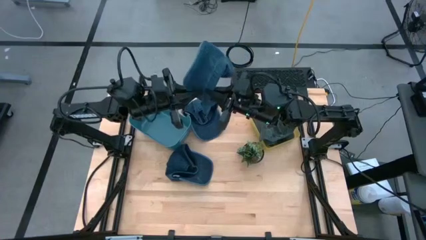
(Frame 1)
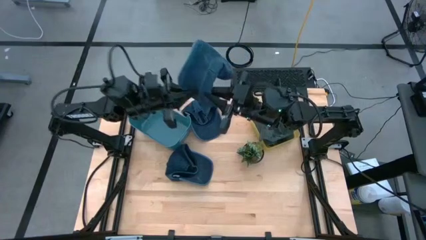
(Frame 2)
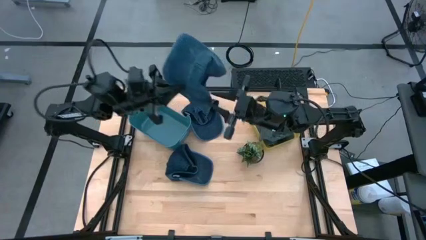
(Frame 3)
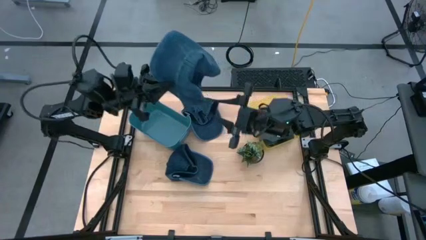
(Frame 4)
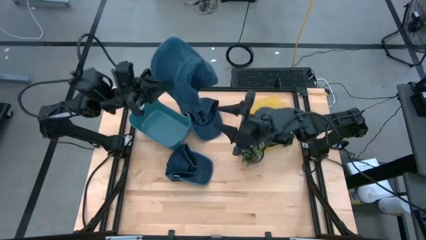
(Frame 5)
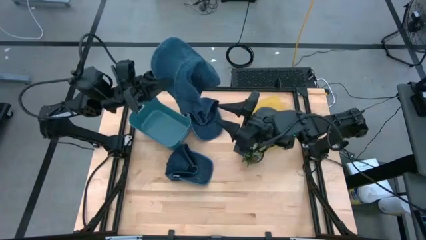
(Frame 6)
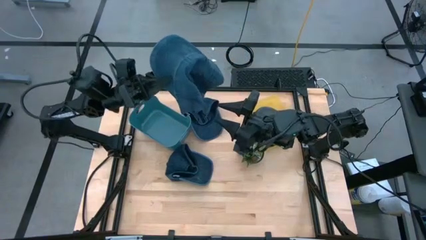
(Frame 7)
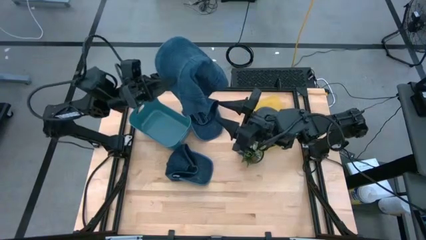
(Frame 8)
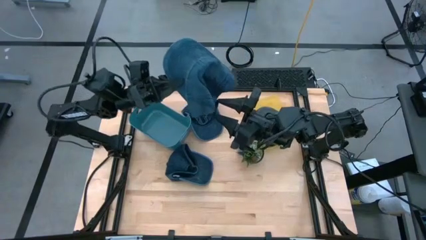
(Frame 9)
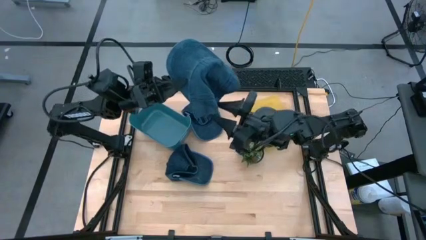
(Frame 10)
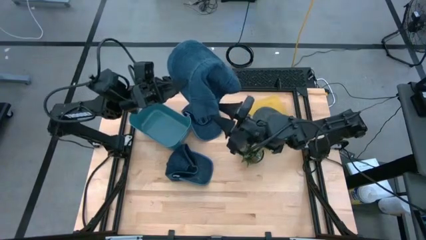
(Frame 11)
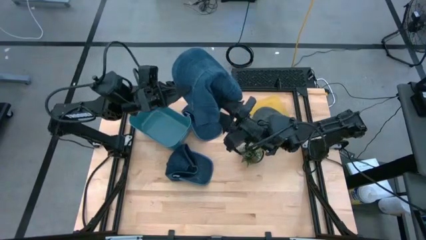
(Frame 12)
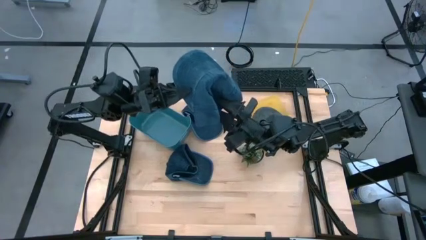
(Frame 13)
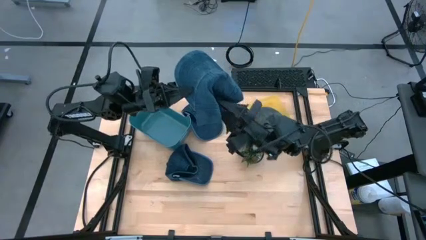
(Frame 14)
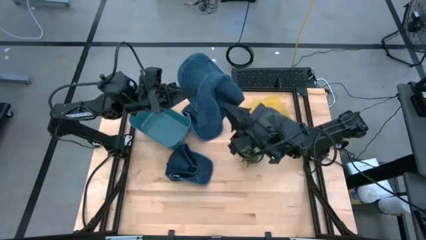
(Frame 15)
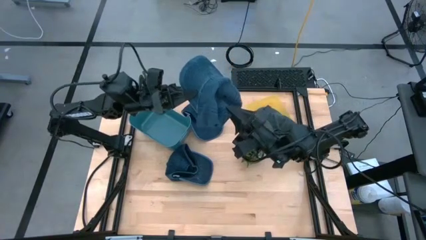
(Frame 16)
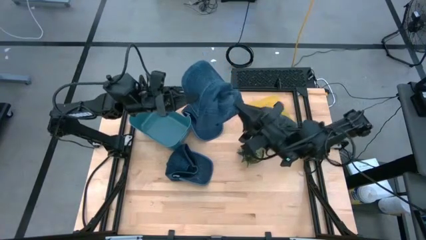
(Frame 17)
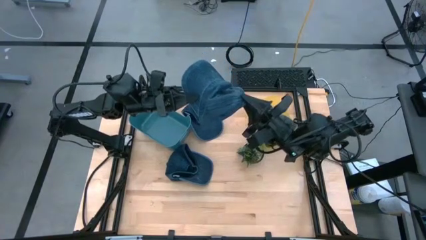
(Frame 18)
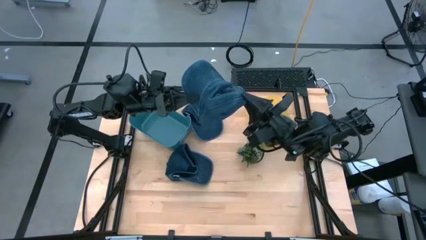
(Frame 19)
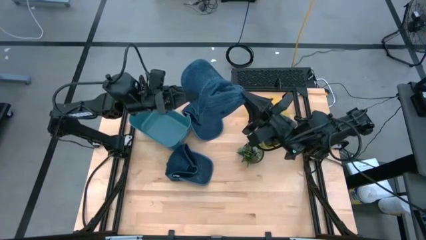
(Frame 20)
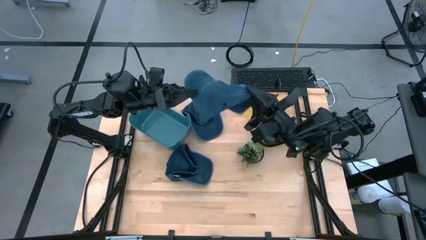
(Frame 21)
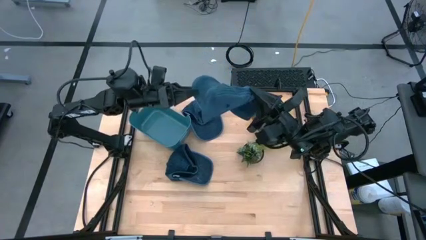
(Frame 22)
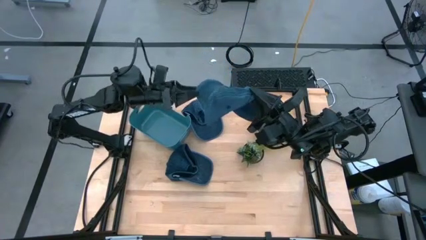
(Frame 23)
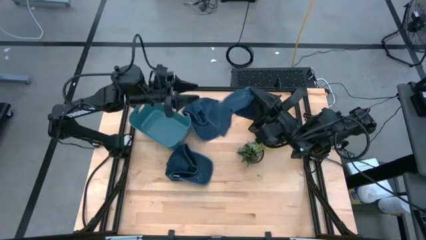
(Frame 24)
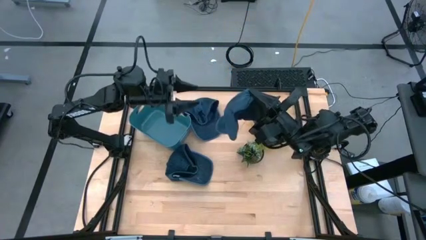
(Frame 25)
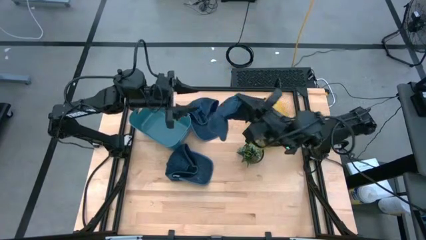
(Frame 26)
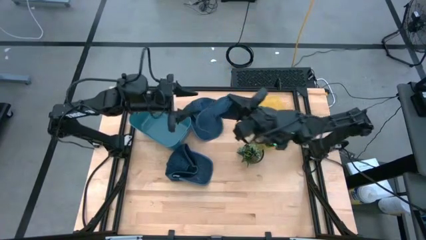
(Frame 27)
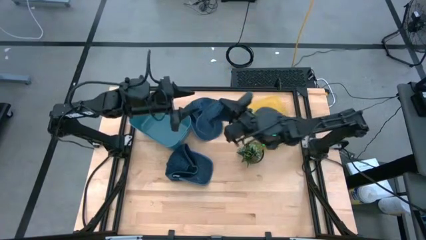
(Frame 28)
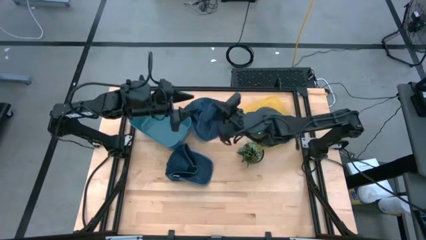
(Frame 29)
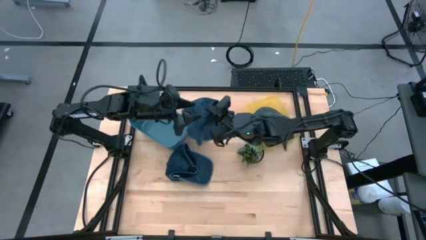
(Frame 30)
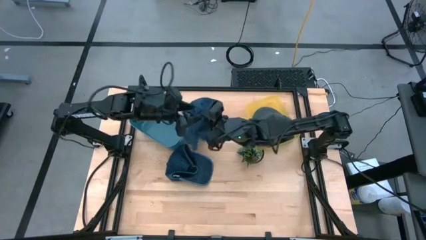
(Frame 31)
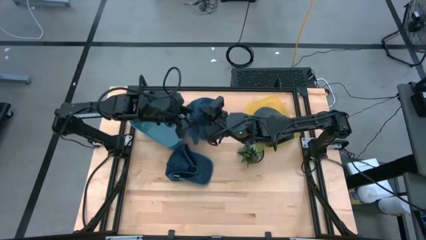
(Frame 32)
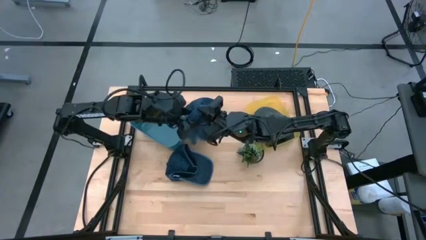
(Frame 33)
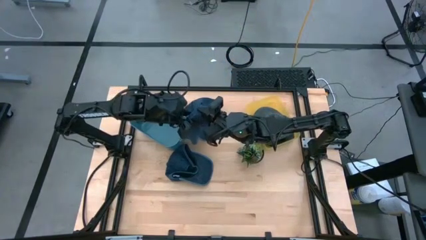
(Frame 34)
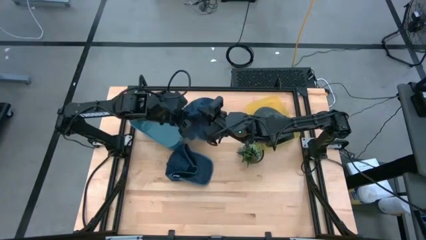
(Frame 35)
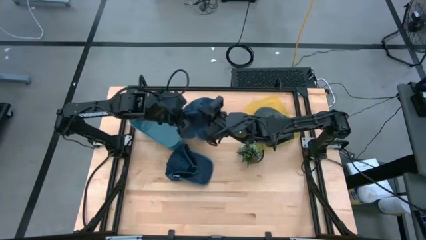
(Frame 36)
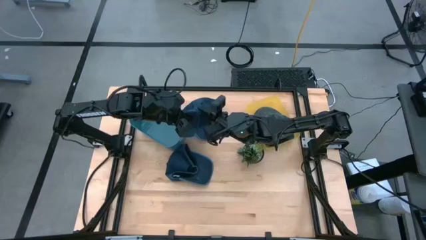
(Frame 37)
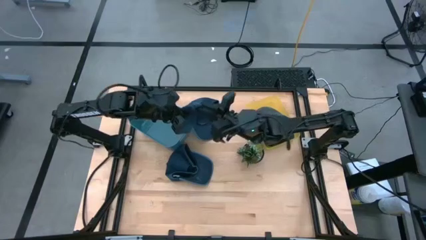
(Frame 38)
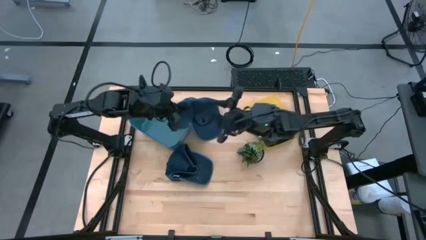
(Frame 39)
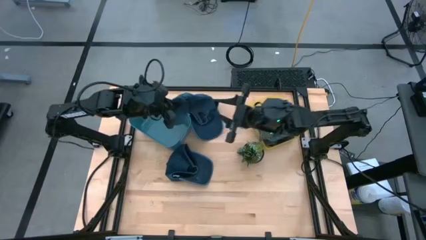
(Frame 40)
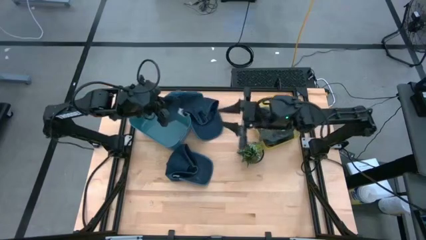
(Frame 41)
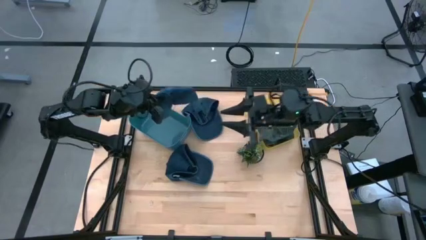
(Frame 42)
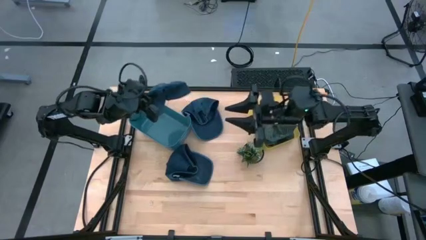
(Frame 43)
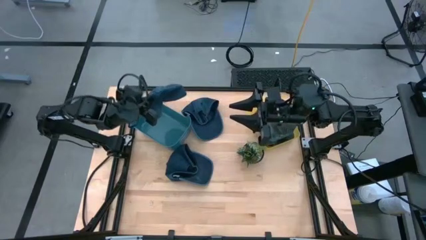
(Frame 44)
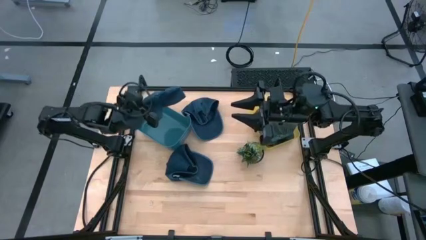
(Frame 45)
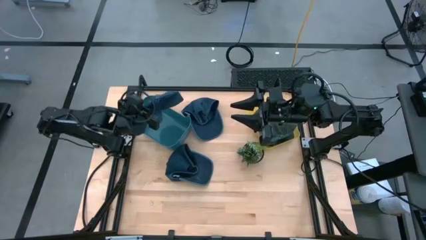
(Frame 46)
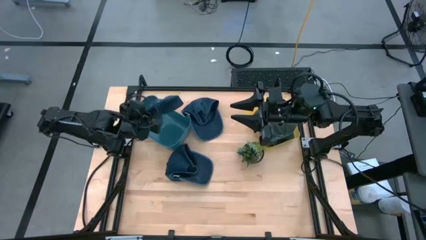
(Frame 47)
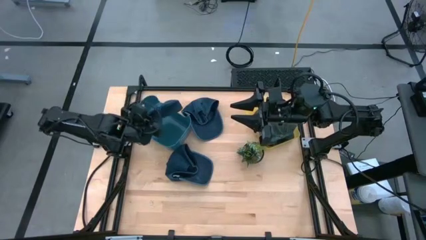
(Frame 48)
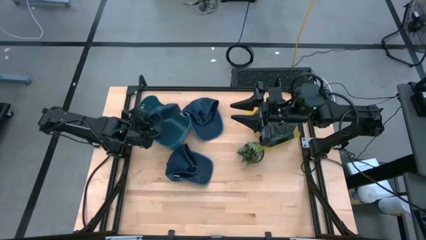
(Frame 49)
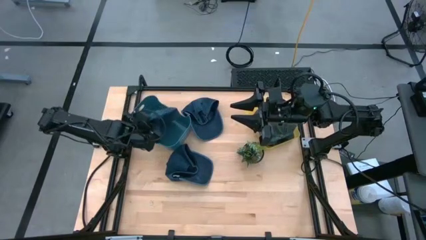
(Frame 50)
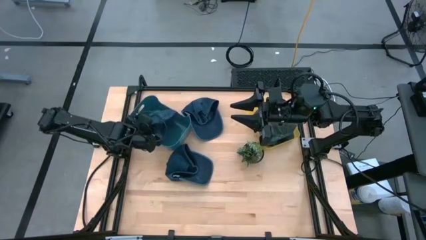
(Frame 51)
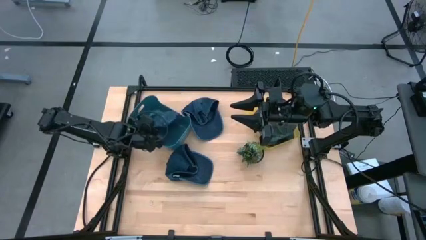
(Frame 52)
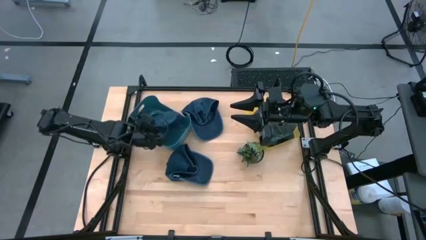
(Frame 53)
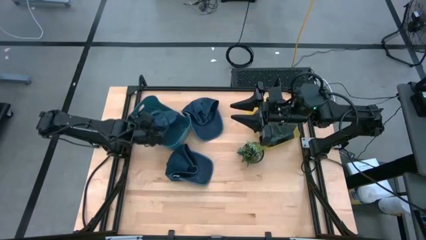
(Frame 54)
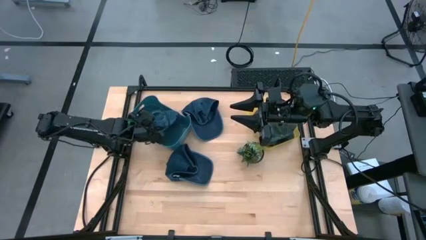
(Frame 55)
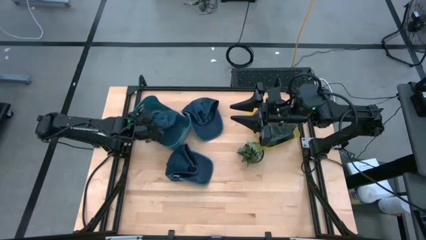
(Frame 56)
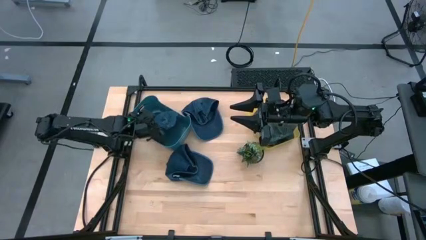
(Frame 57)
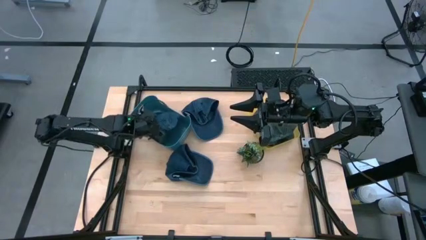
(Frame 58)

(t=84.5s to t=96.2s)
Task: Pick & Place hat
Put the bottom blue cap into the blue bin
